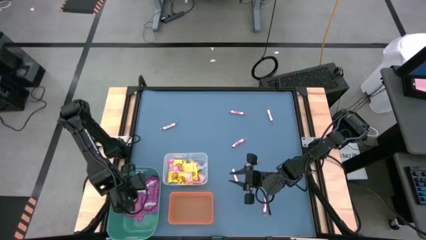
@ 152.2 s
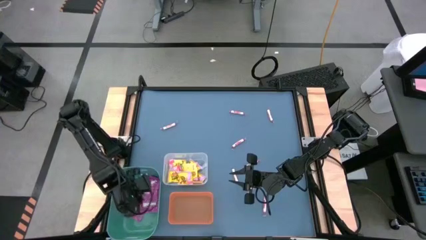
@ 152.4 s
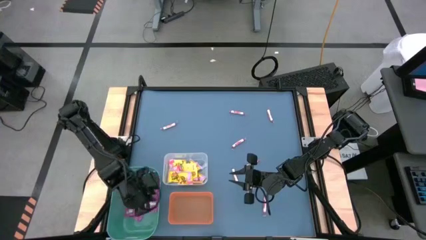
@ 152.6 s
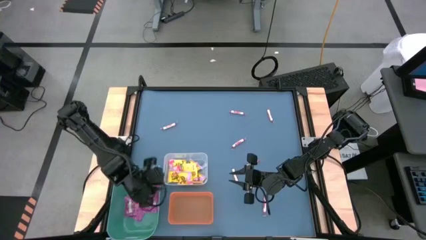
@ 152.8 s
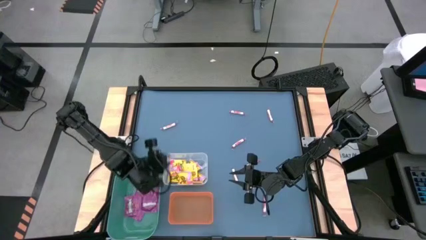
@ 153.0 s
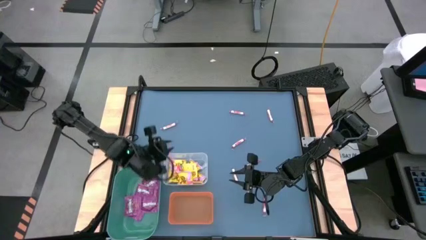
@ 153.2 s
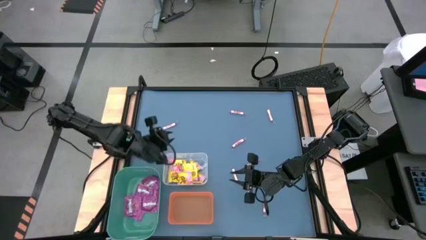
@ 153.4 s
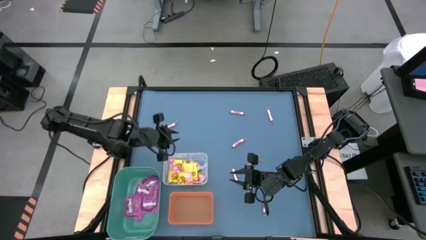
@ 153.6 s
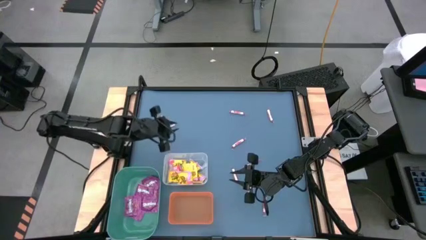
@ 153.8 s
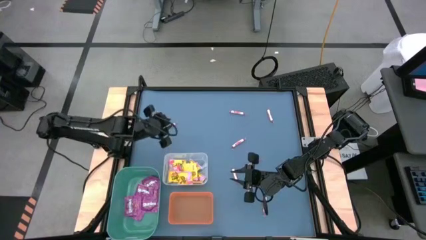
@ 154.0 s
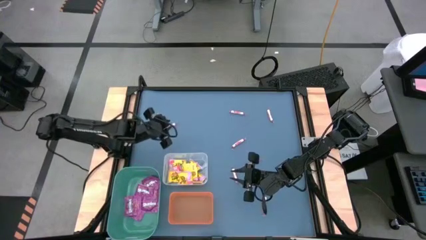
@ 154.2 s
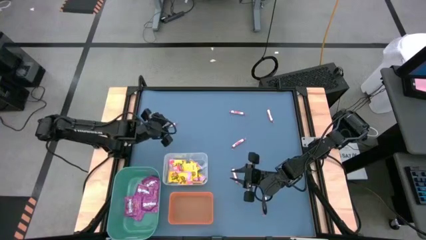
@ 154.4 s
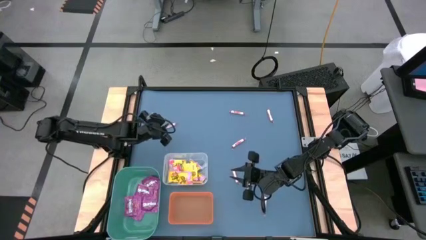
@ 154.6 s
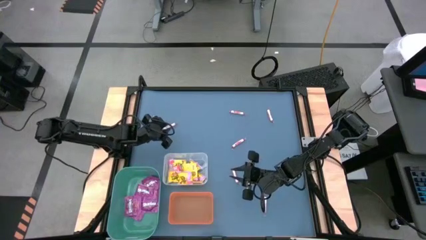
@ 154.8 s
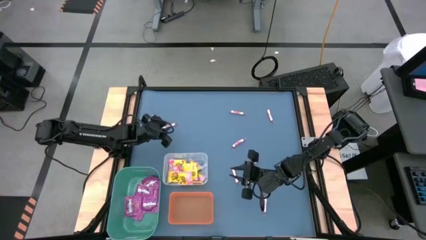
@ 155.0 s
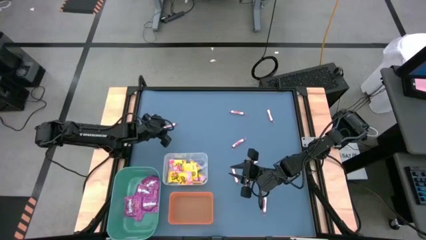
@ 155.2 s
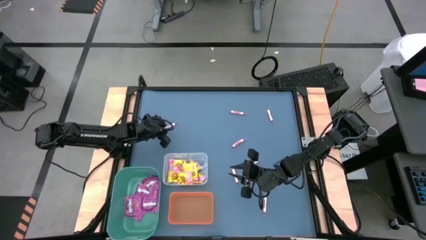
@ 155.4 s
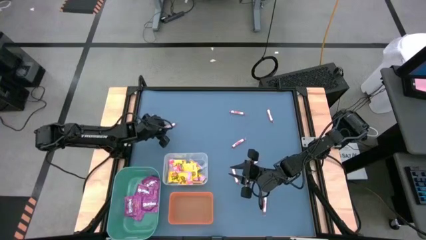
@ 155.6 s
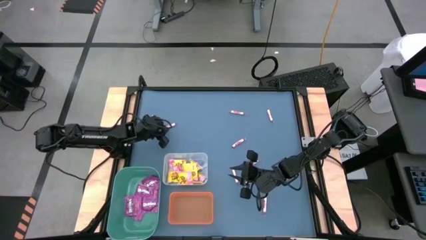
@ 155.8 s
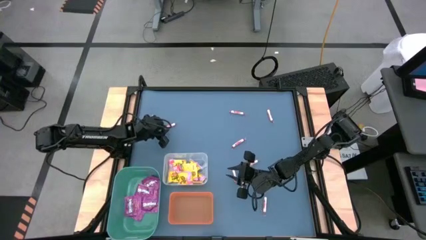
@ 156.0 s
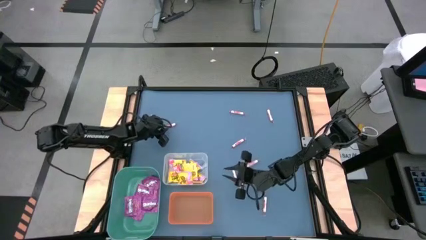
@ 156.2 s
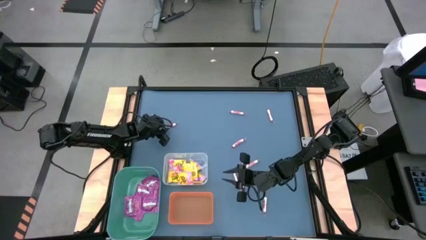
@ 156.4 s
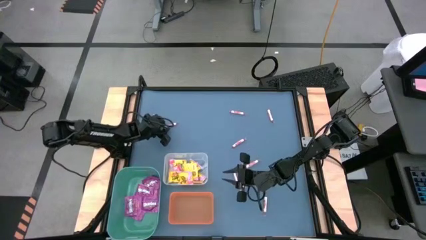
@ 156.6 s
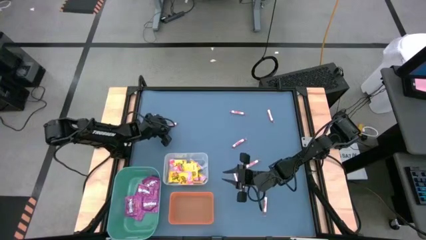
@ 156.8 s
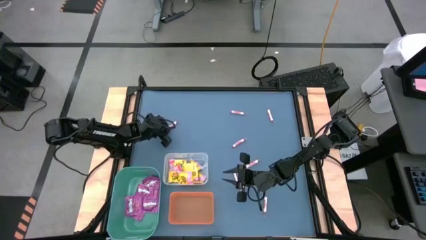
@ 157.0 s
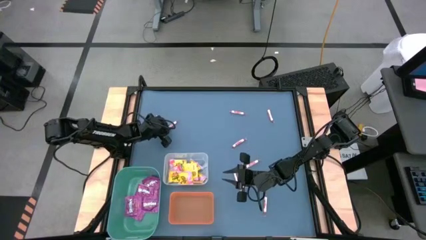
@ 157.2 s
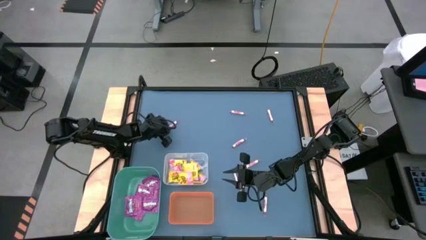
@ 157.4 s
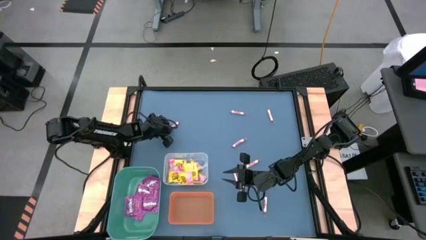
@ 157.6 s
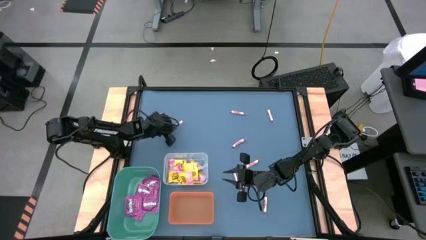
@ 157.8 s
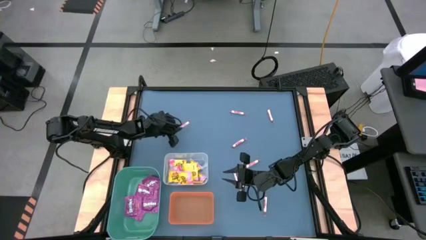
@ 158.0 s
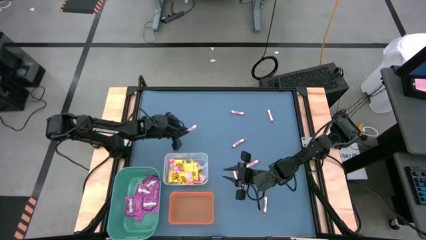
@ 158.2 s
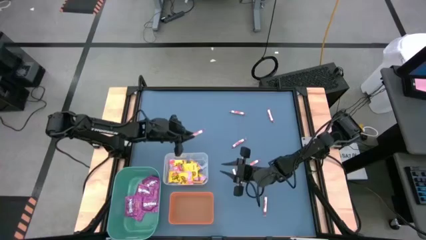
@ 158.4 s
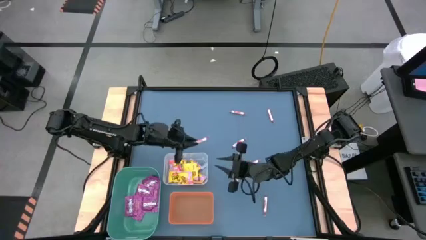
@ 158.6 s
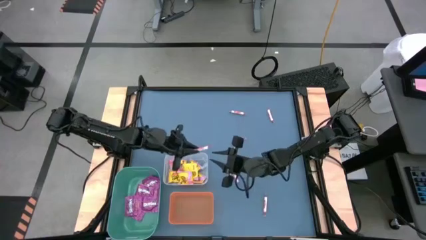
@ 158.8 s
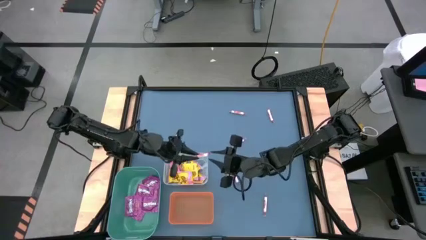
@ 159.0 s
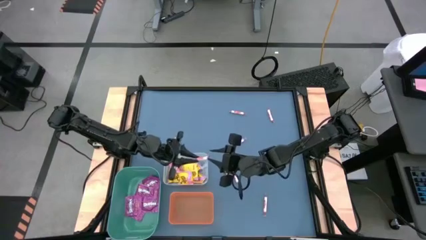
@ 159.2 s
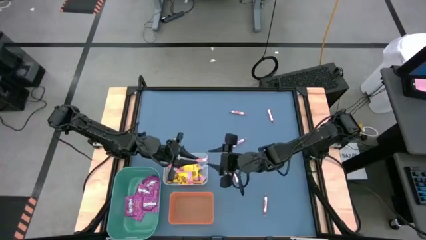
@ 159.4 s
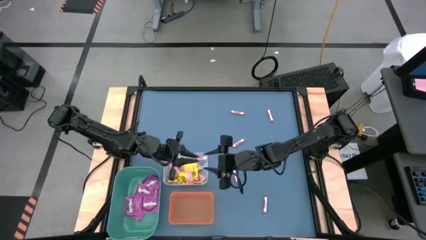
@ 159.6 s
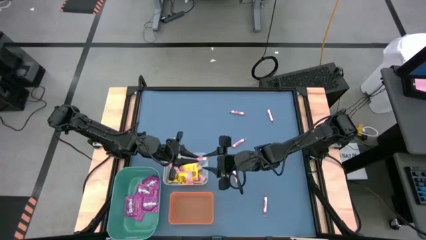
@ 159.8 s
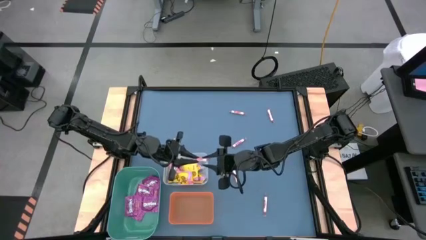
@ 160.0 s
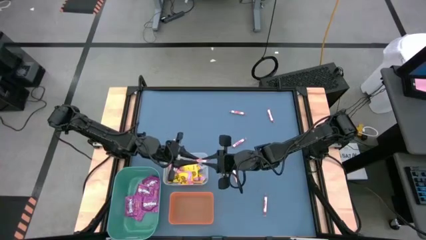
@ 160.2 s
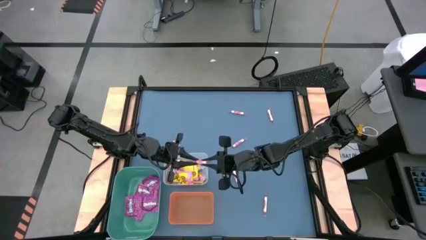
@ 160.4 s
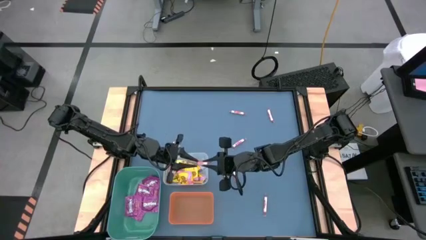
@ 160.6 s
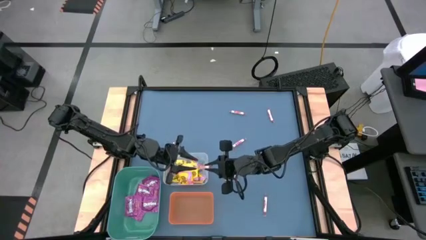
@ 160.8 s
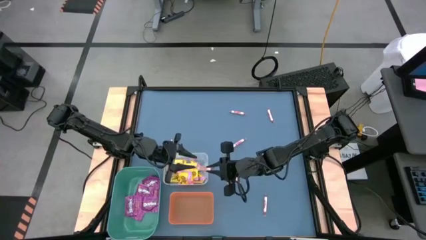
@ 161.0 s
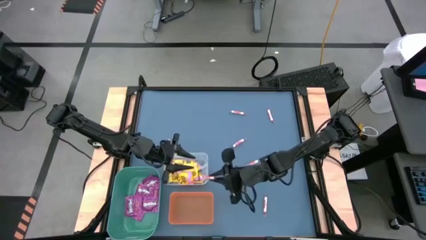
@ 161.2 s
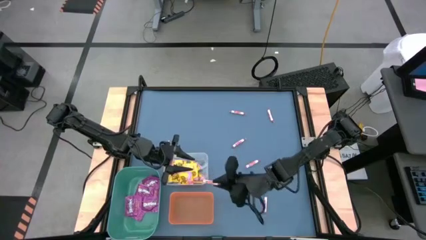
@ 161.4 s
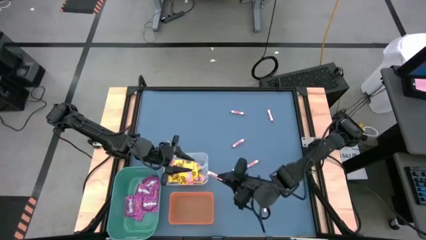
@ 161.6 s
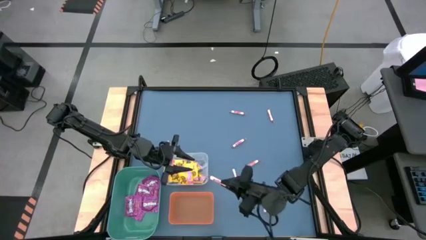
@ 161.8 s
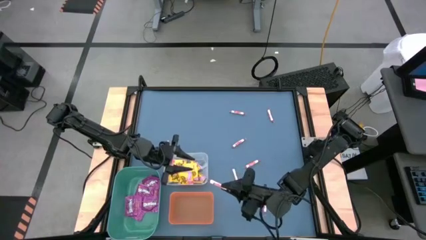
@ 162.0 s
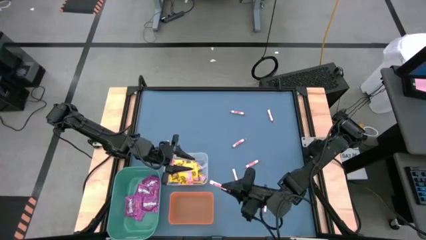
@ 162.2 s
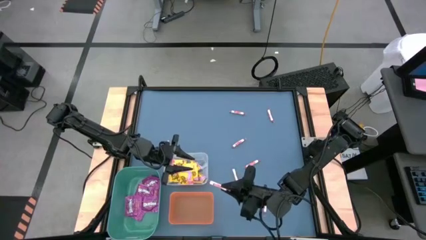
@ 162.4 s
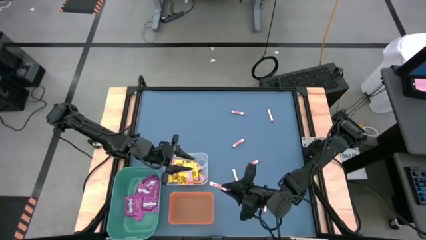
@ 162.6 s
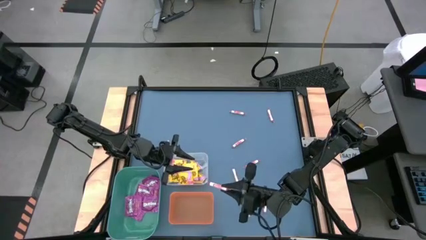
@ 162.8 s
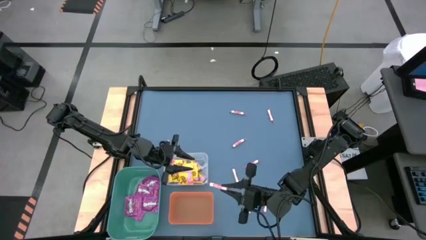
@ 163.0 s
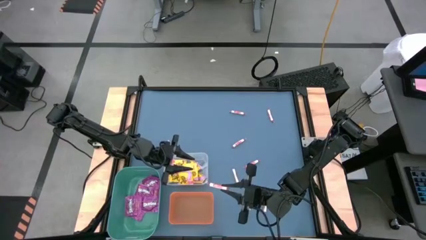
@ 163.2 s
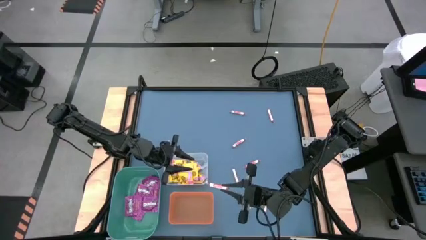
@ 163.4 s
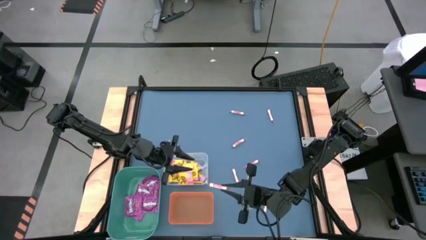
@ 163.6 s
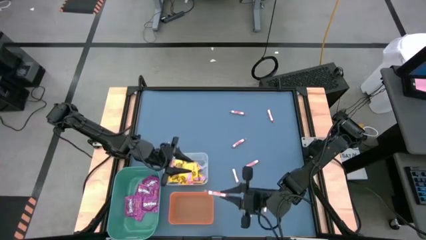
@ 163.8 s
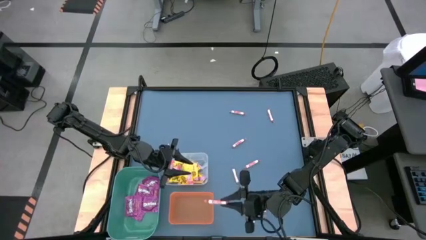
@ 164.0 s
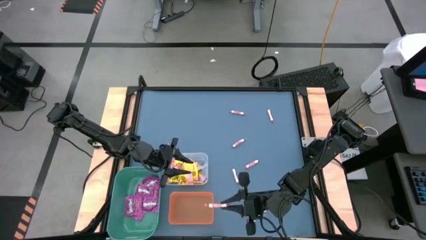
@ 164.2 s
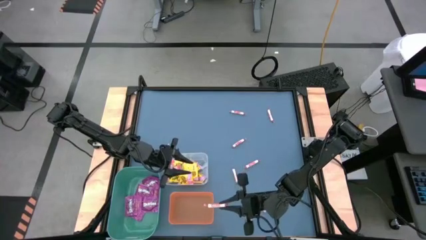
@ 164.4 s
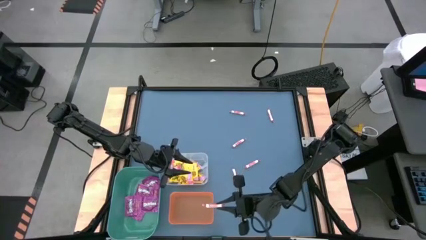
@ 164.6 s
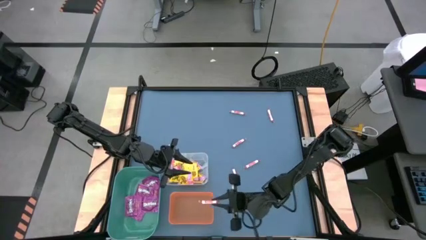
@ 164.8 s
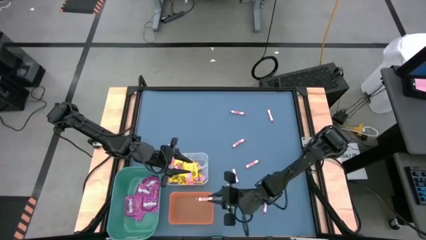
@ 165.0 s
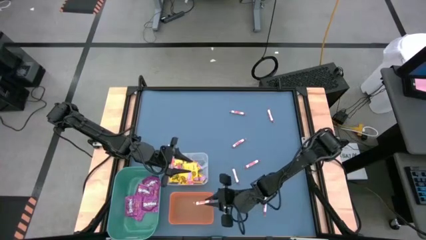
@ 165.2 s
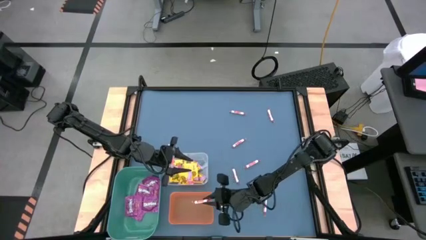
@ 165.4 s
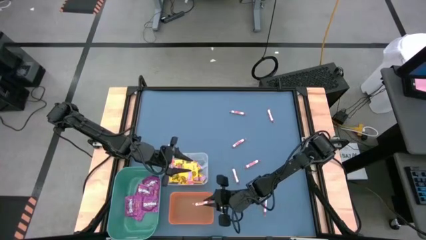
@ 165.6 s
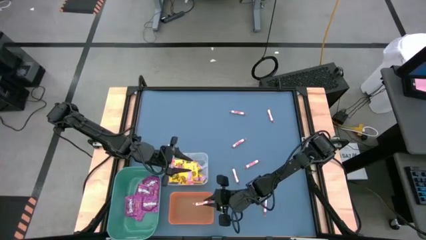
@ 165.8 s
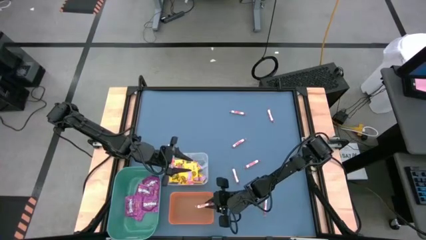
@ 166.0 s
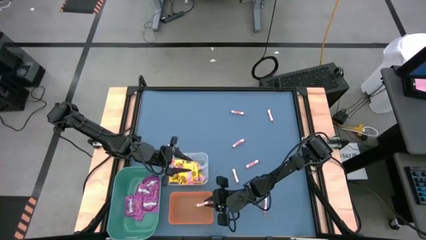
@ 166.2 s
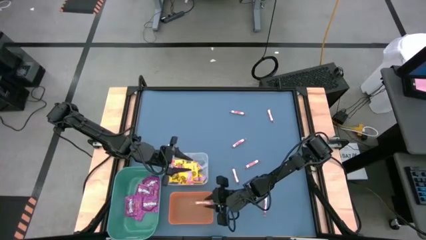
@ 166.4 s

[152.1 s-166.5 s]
Task: Sort candy
Put the red candy into the orange bin
